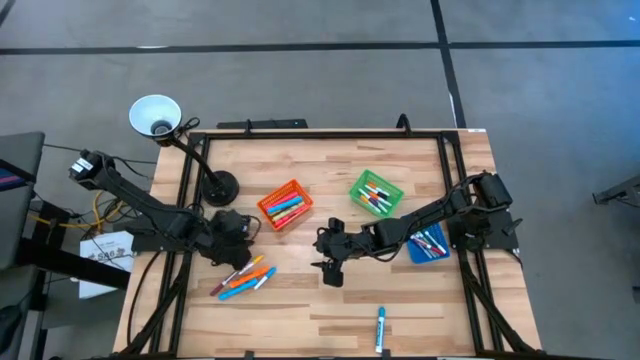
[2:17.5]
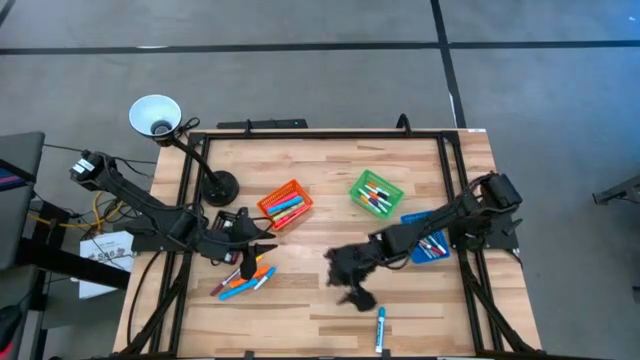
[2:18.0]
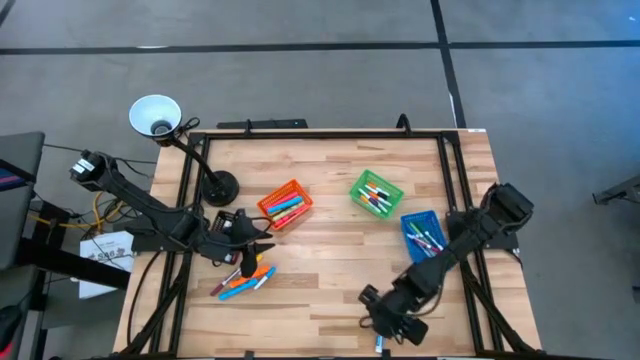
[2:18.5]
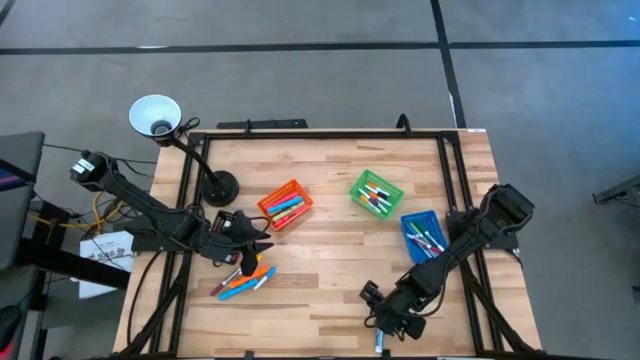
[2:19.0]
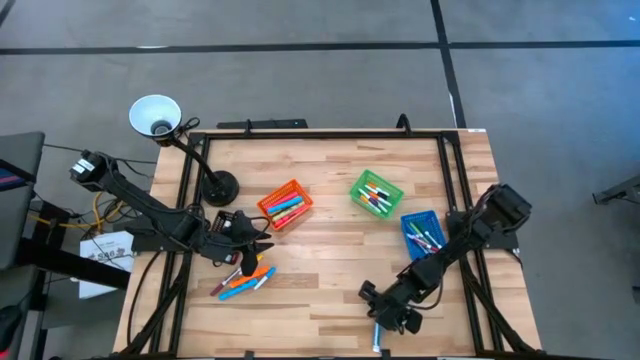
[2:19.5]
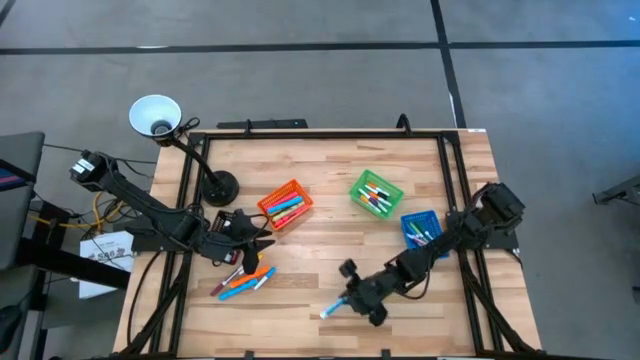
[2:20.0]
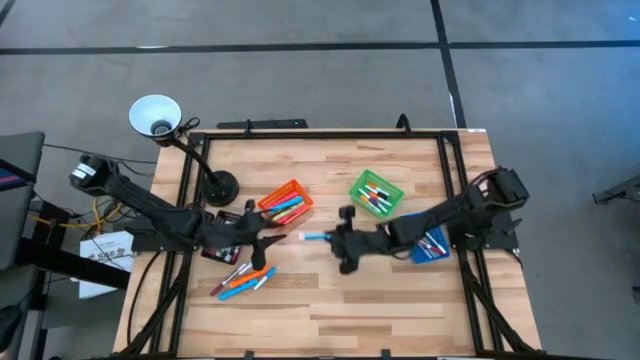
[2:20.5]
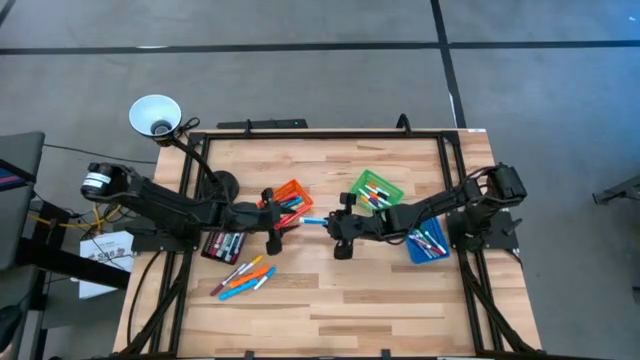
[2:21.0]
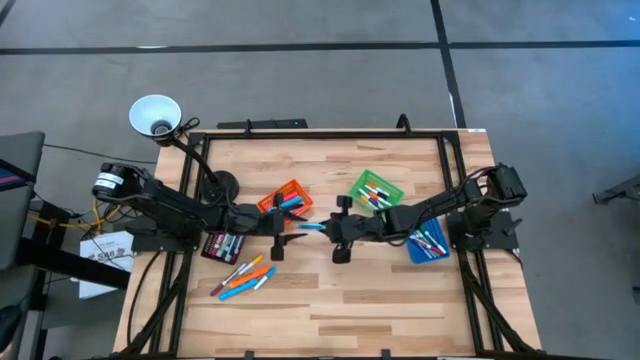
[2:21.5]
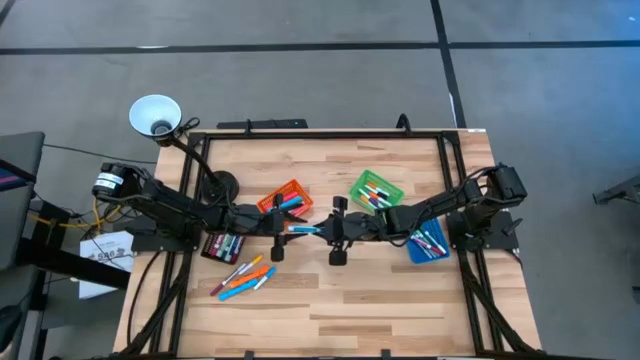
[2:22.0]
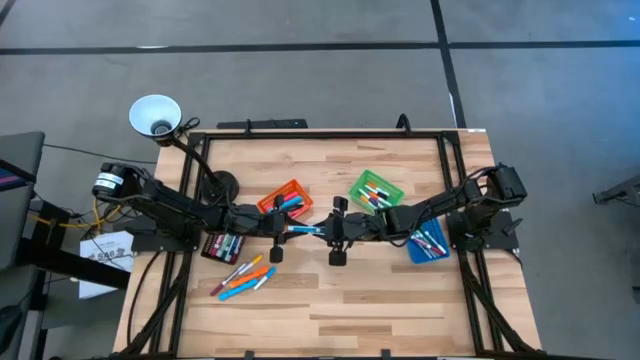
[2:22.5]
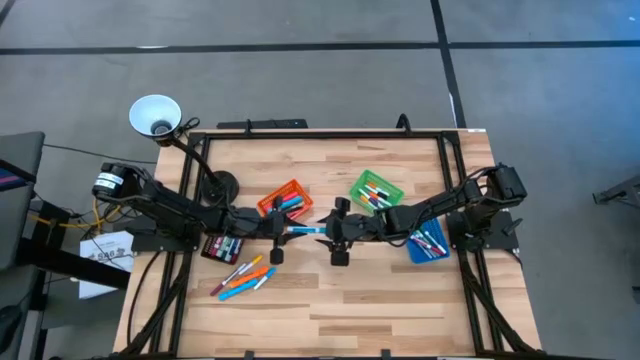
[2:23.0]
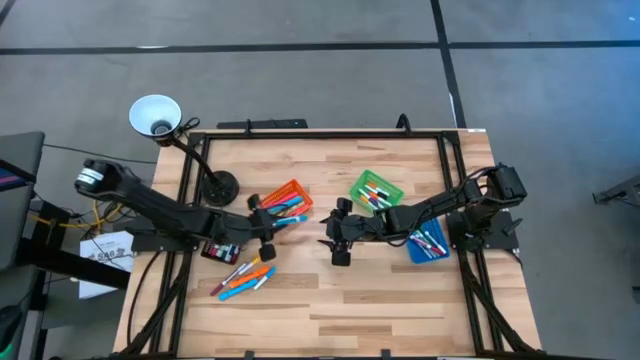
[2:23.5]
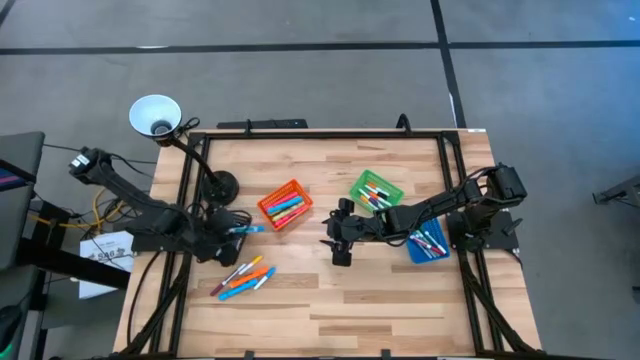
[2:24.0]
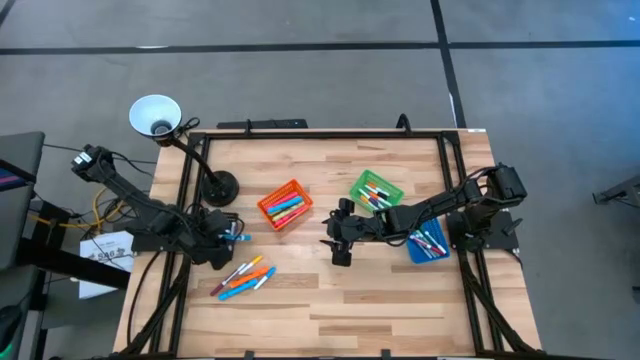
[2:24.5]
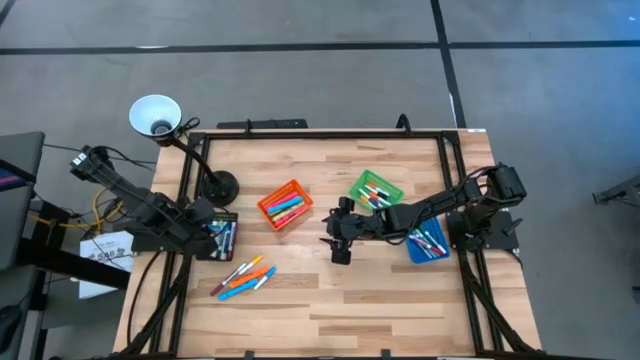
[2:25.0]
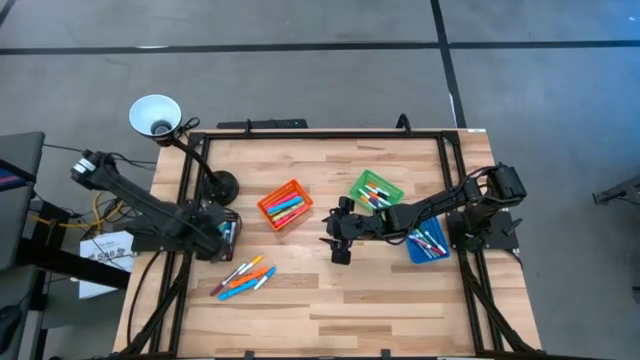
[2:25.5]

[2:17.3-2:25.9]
Task: Pick & Place Markers
Put the light blue marker pen into the black bin

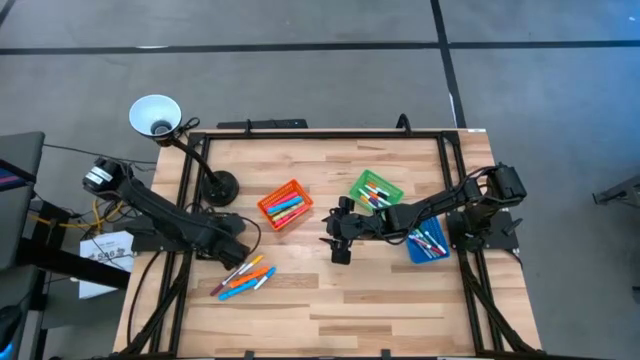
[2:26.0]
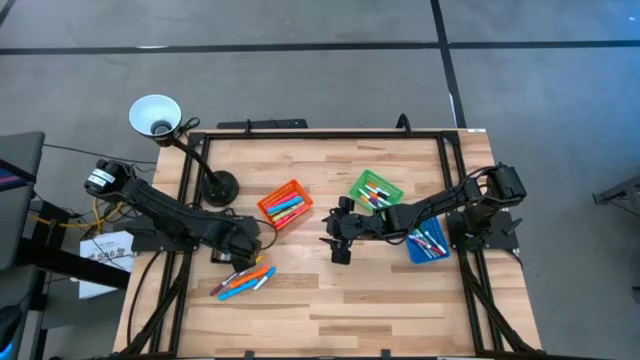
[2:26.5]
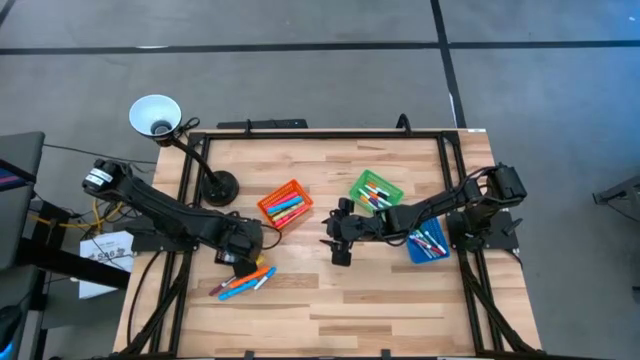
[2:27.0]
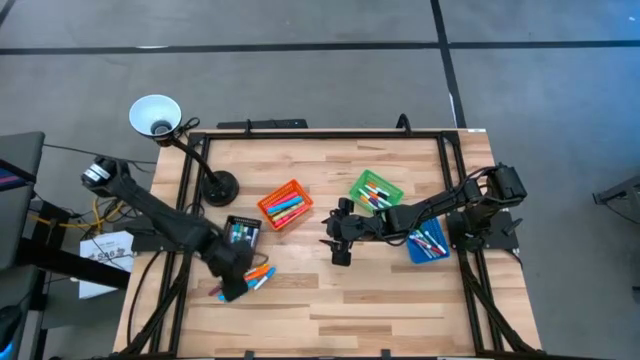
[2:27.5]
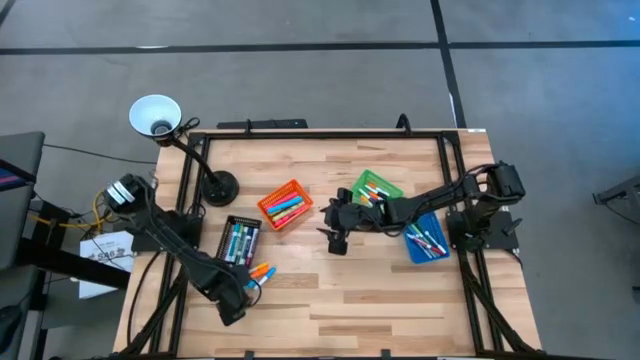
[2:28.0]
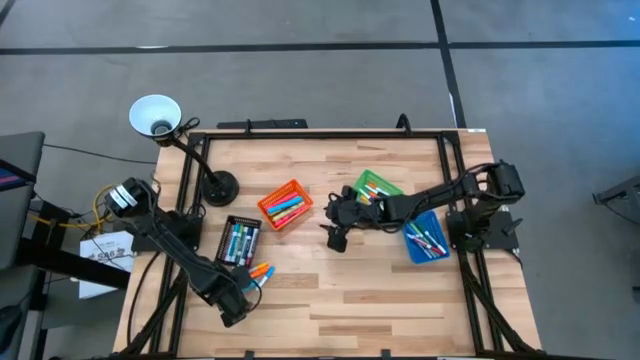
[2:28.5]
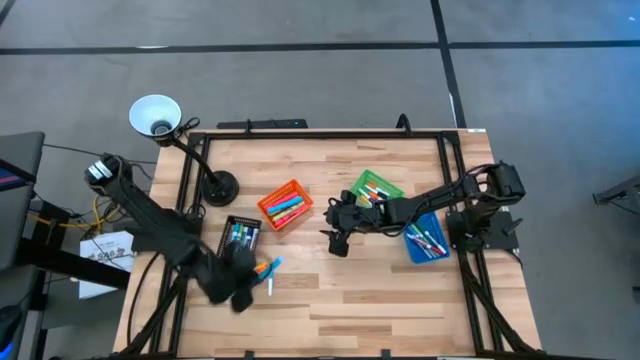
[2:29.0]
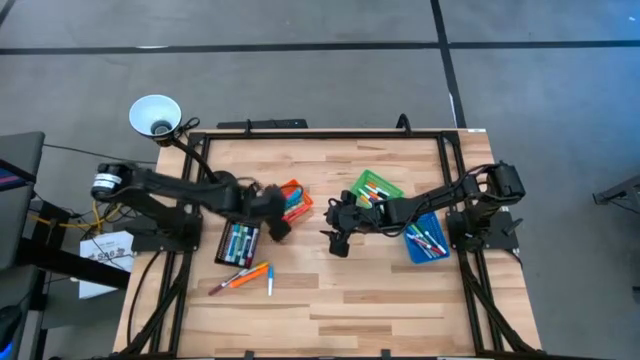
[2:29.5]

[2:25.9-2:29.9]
Put the light blue highlighter pen into the orange bin

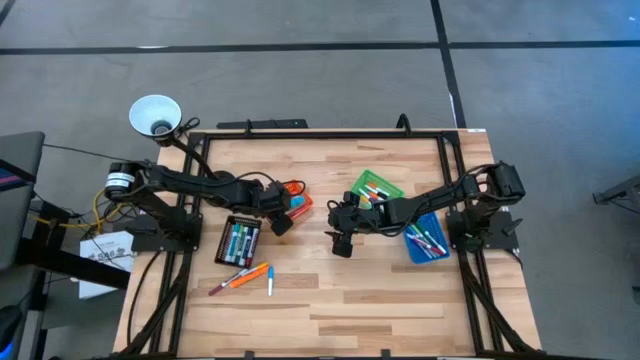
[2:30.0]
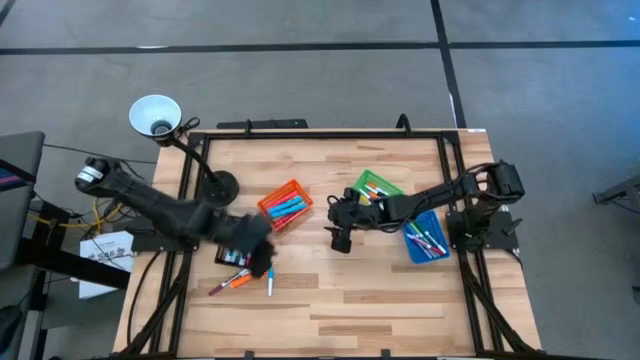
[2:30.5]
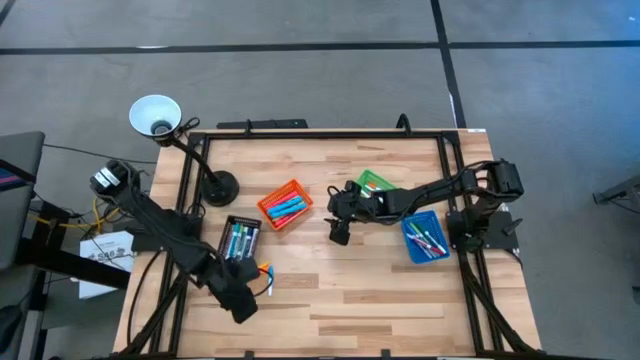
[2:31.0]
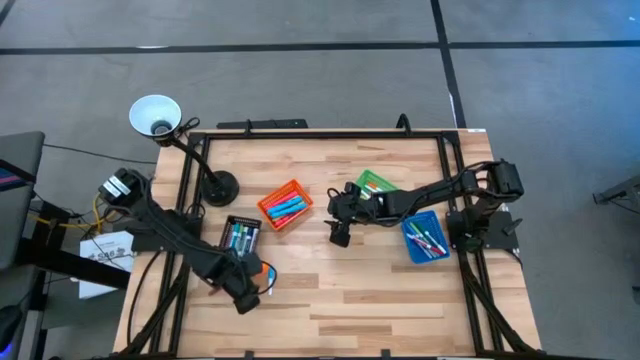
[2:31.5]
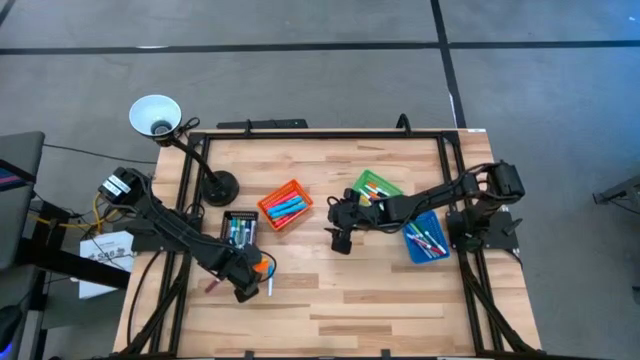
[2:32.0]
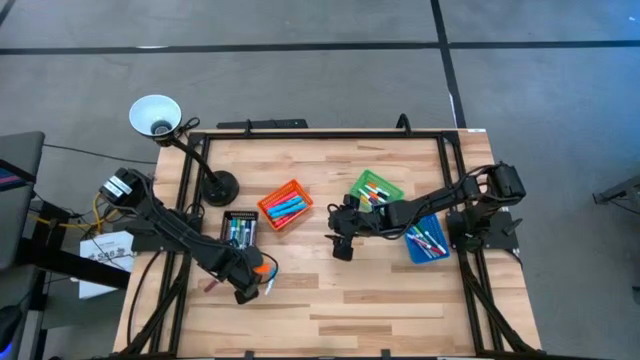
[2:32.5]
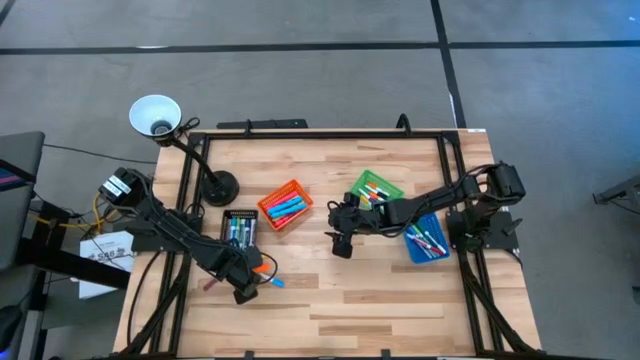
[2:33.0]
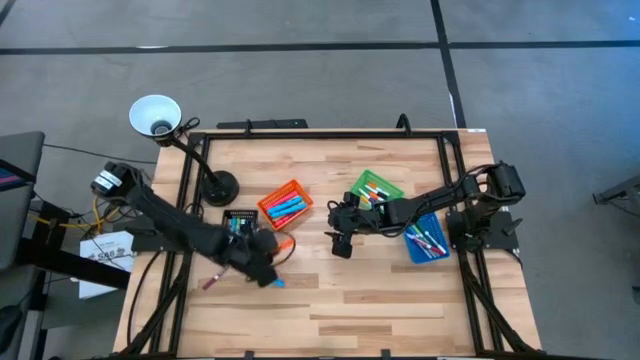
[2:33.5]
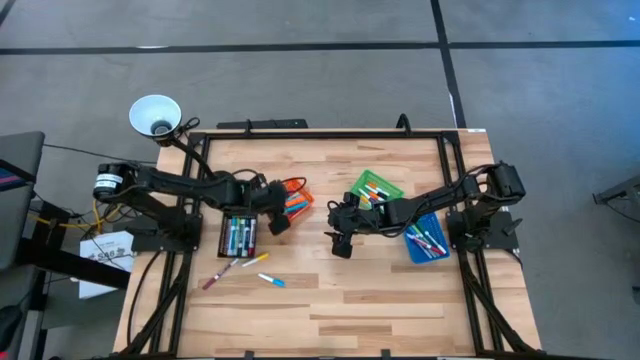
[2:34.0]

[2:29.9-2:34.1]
Put the orange highlighter pen into the orange bin

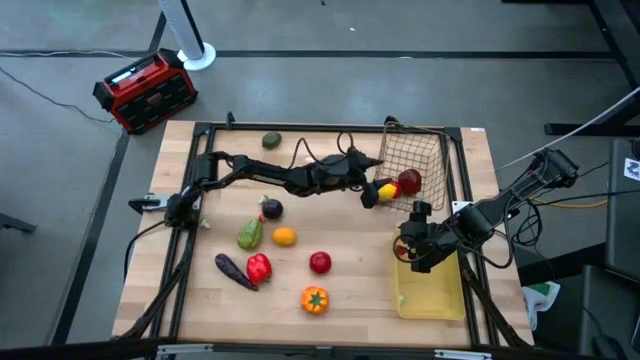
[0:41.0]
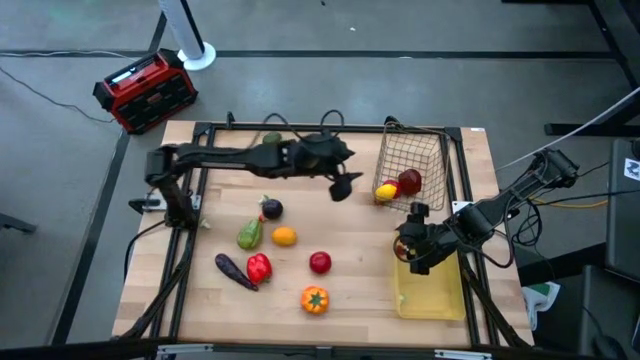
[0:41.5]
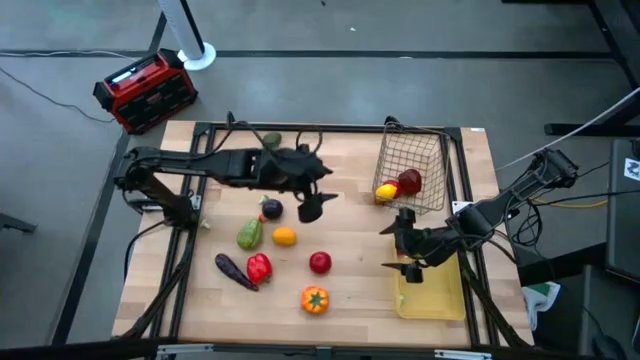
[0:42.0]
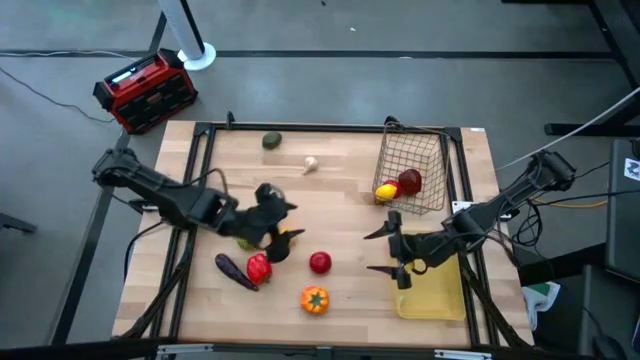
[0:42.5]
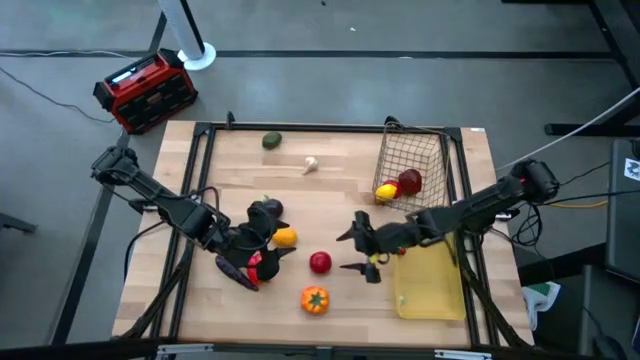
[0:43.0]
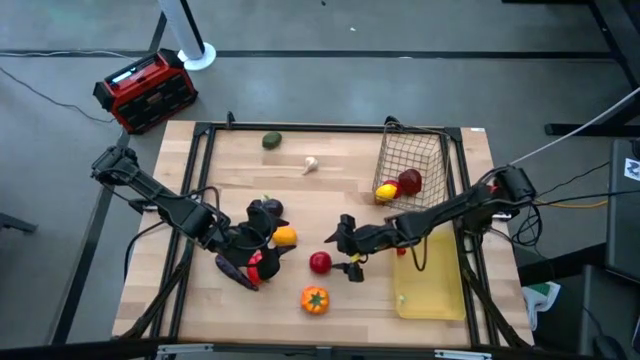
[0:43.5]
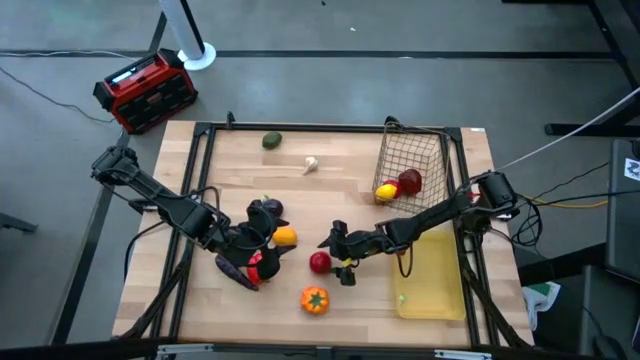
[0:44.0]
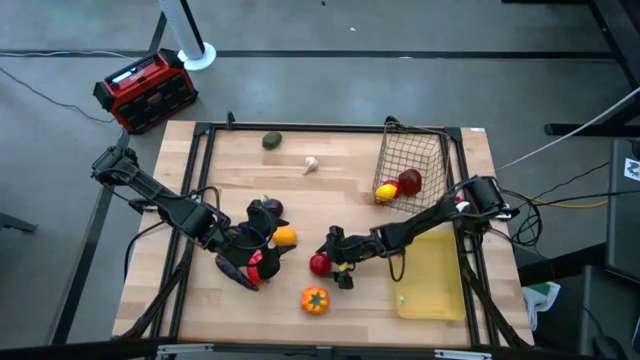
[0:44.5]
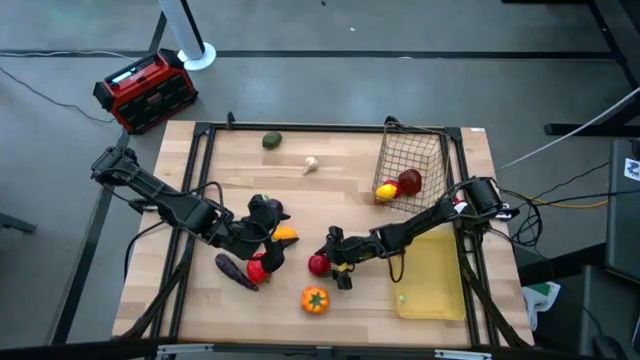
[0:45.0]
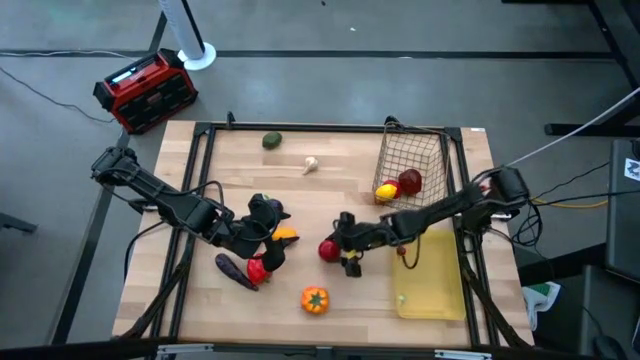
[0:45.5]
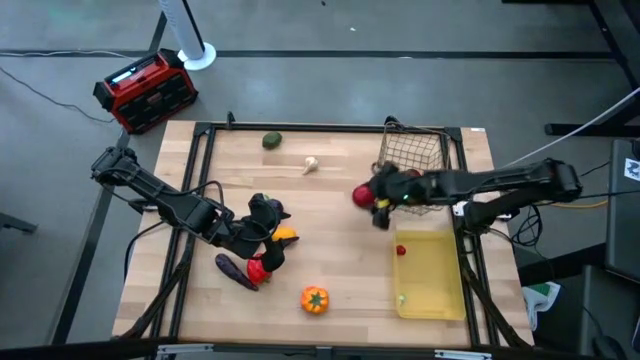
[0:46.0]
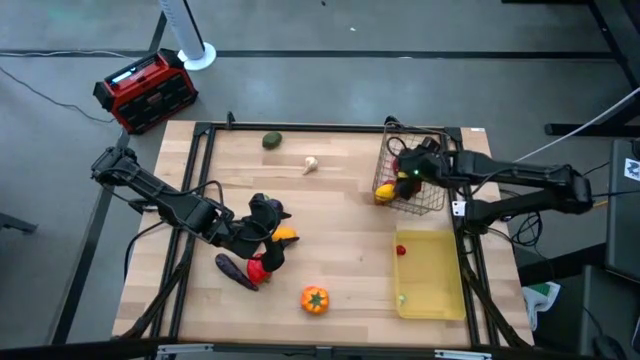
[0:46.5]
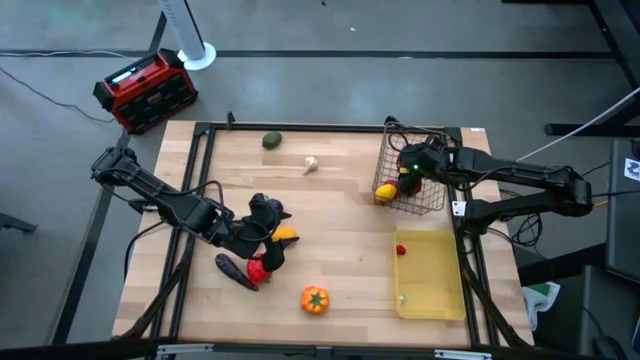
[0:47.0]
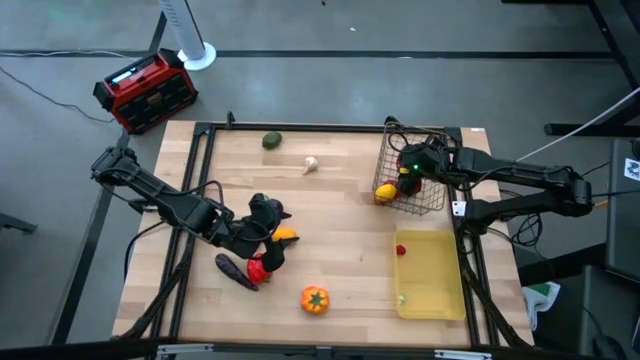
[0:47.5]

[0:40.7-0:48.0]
Task: Sort produce into baskets
Put the red tomato into the wired bin
